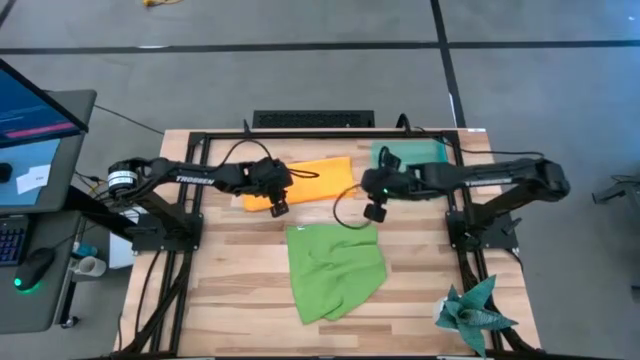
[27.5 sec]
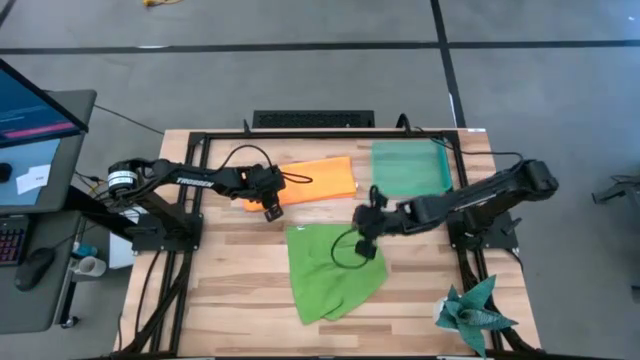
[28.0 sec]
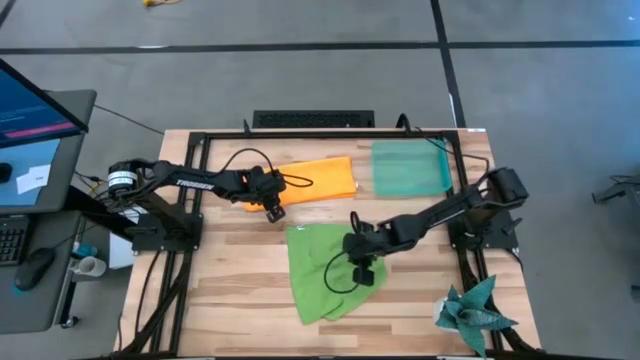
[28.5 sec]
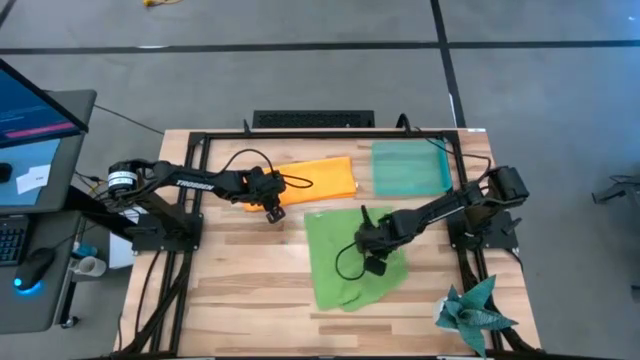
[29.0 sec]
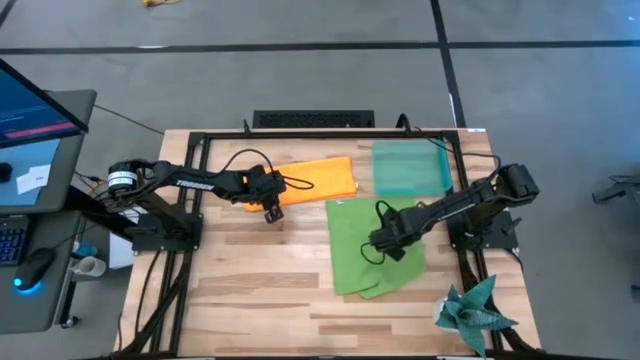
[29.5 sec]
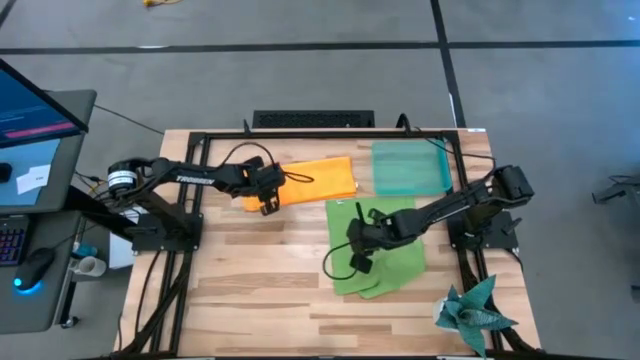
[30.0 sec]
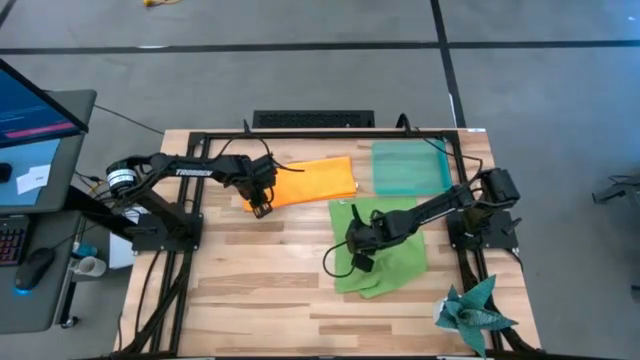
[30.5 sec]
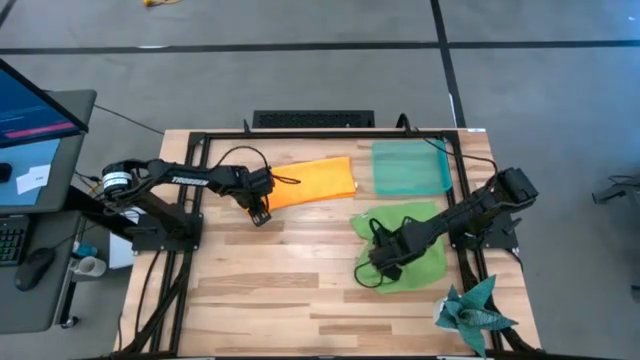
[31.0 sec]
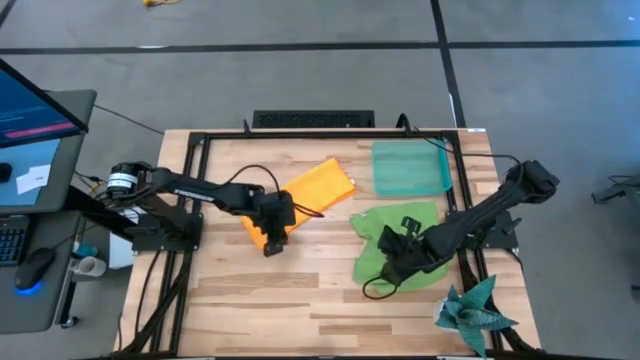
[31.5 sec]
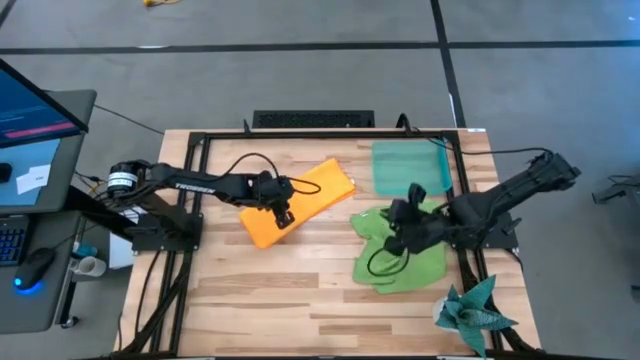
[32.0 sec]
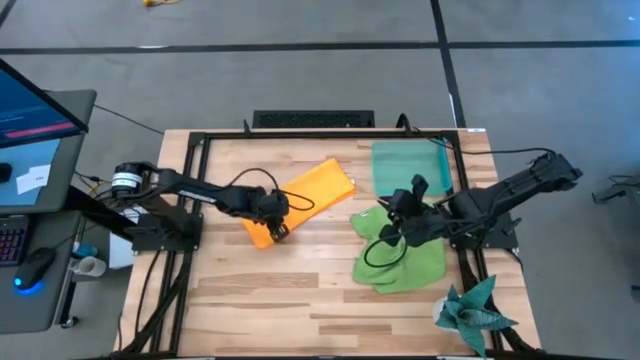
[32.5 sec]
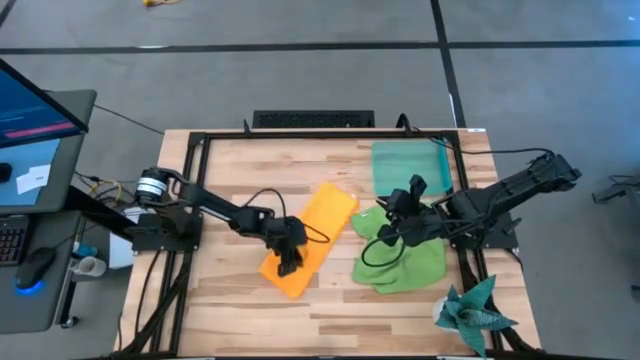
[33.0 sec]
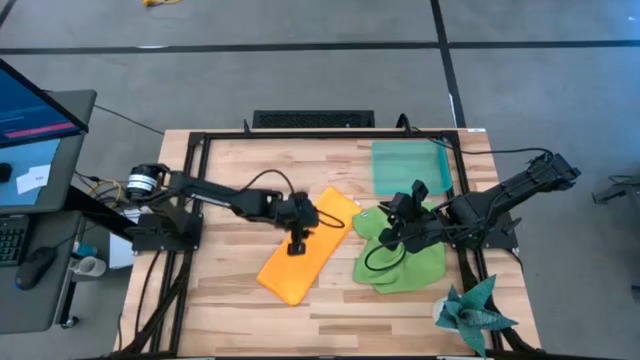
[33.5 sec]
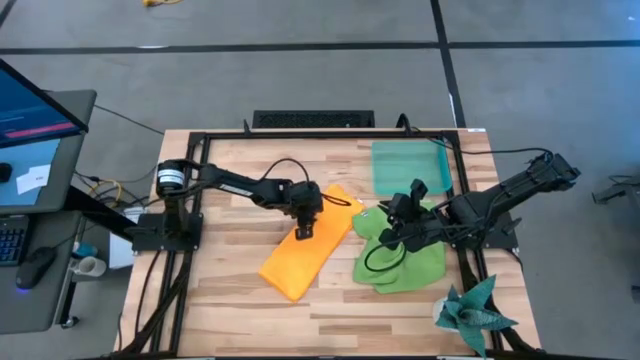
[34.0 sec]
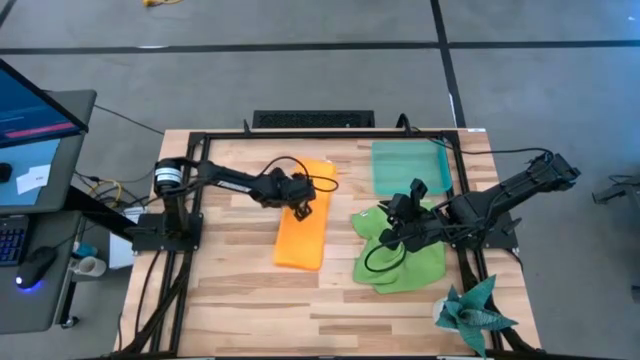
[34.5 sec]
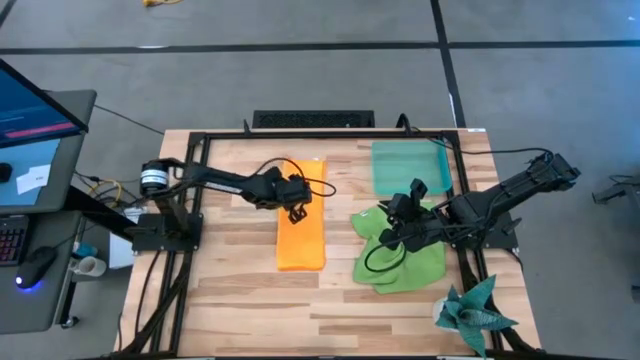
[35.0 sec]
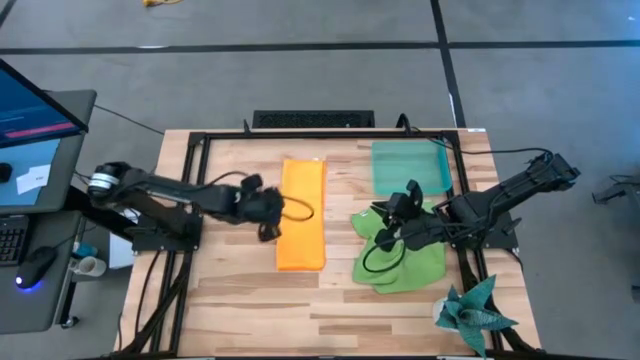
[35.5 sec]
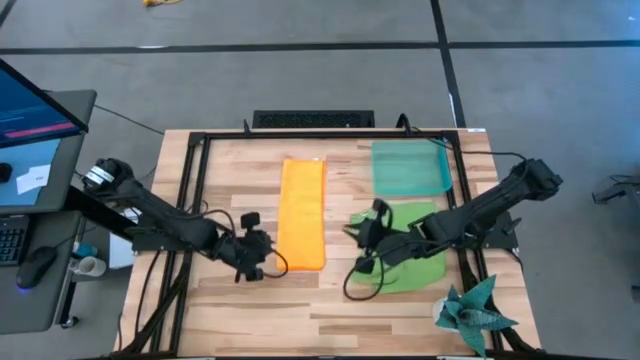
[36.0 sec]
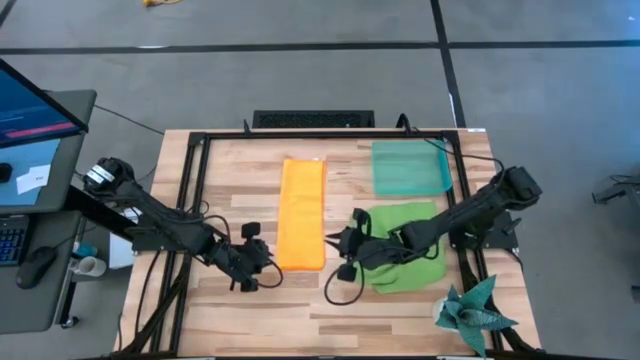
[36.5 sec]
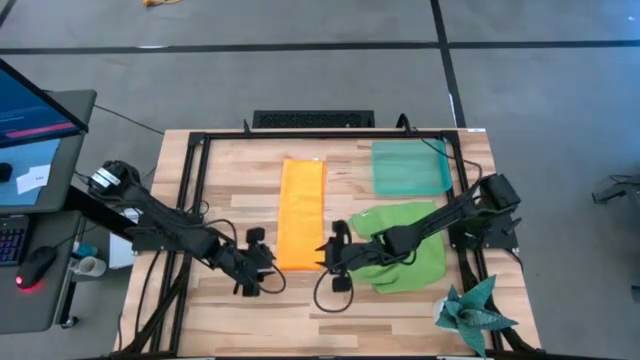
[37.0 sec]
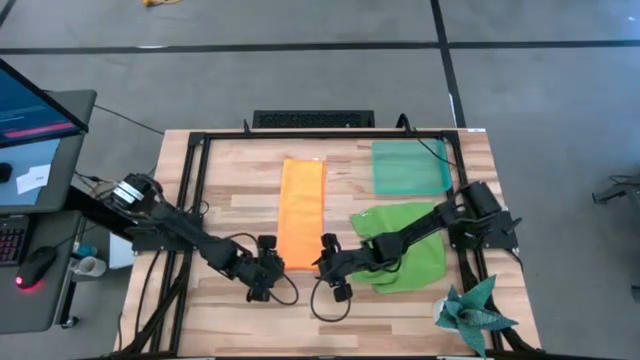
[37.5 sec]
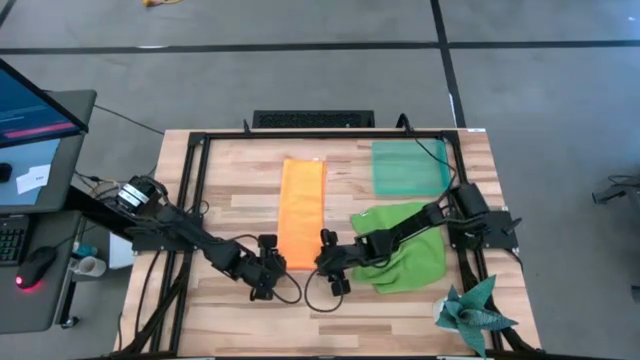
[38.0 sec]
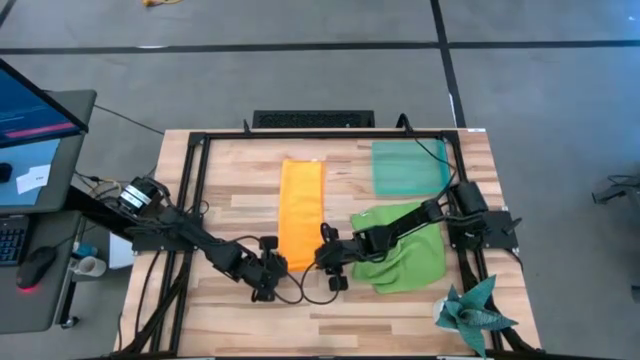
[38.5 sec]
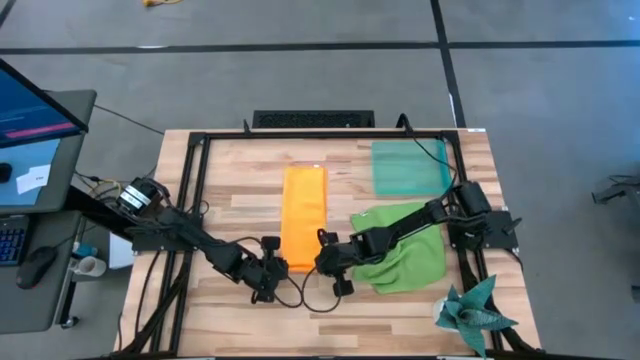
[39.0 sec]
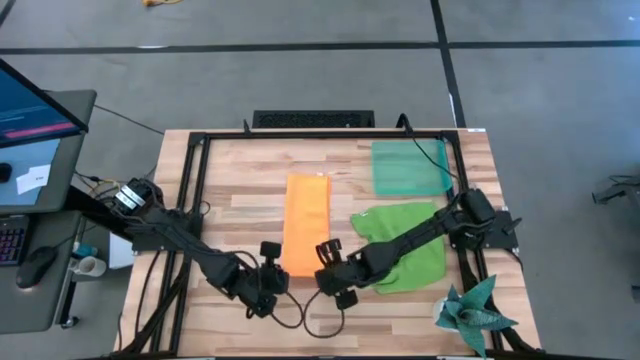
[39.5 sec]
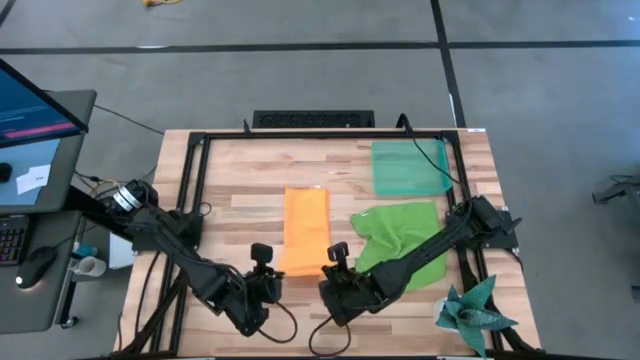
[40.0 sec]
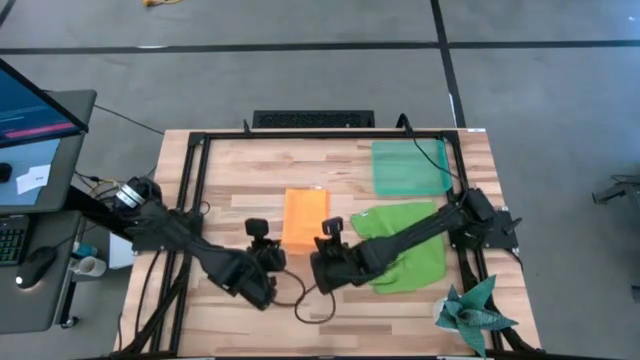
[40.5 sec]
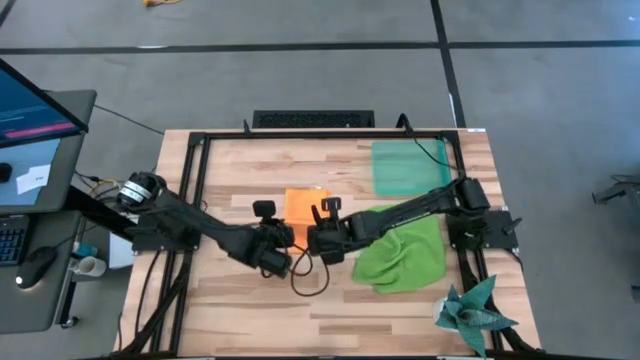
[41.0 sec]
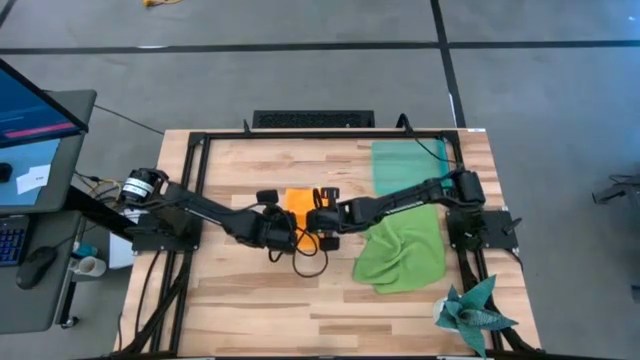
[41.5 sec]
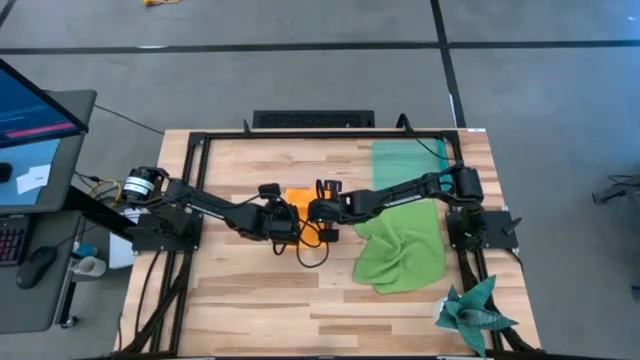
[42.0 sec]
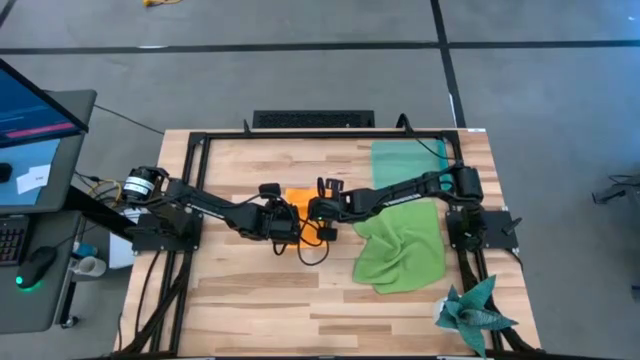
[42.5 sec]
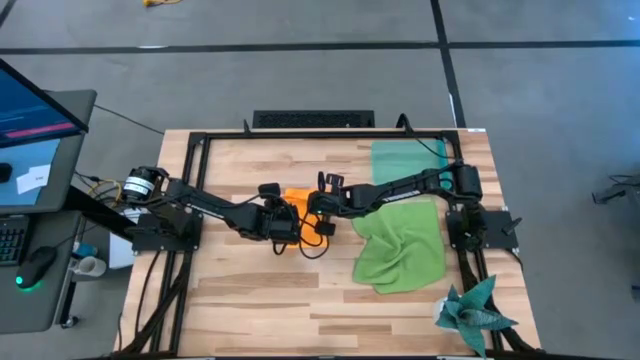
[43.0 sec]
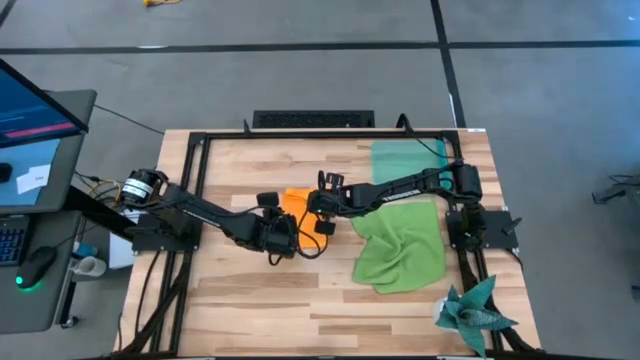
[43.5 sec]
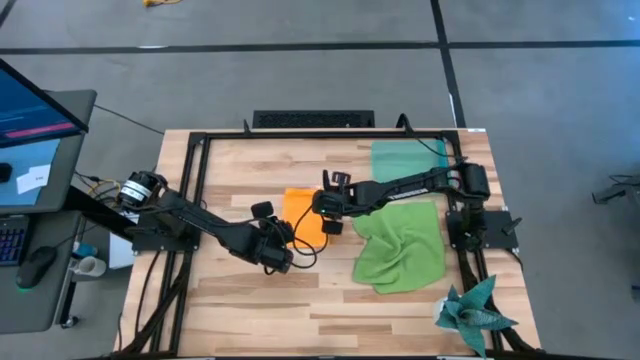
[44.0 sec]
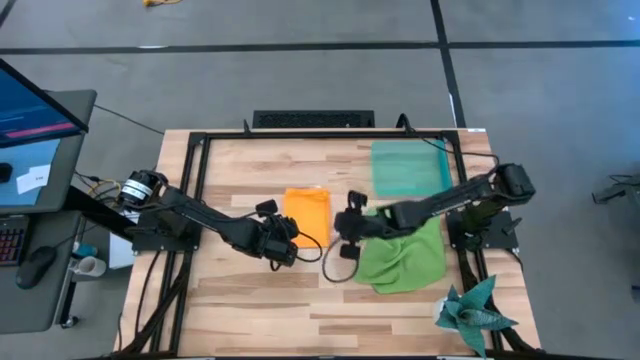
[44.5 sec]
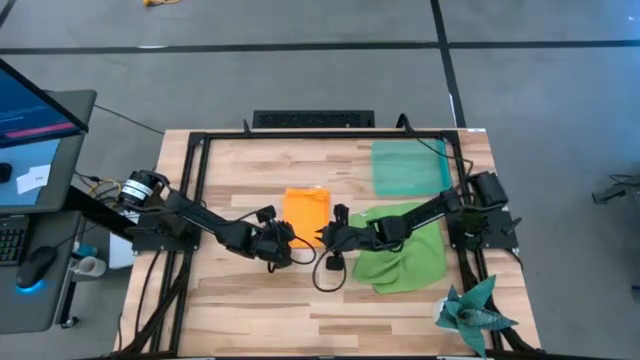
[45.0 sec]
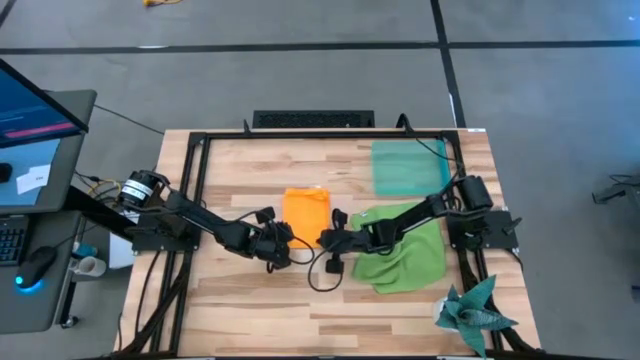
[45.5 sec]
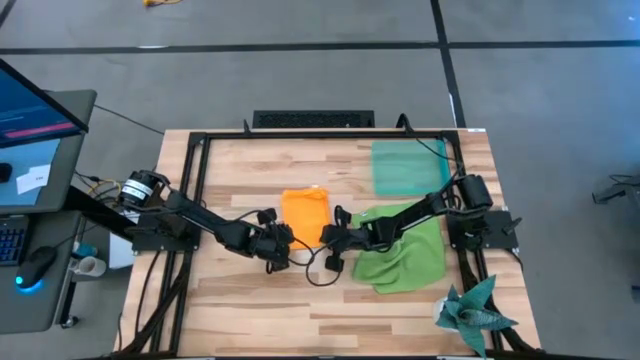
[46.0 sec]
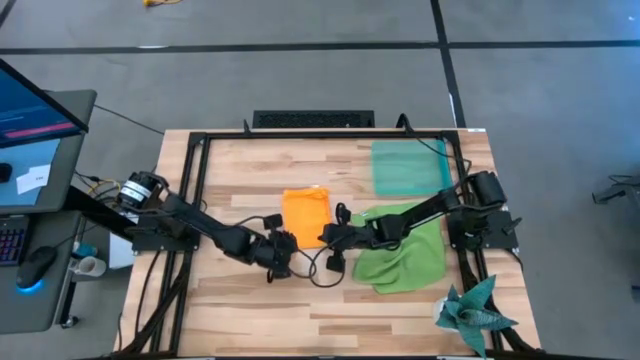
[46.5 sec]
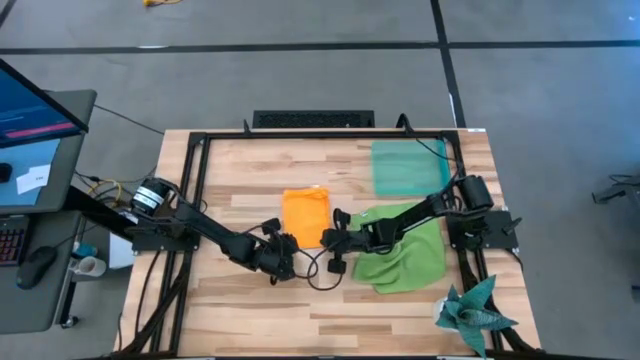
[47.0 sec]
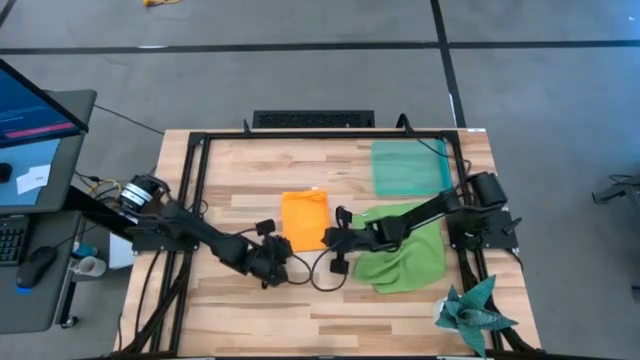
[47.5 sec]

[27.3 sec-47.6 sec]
Task: Roll microfiber towels into tight, uniform cylinder then place into a basket
Fold the orange towel
